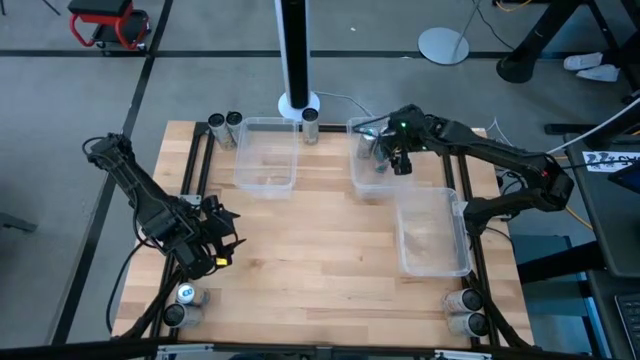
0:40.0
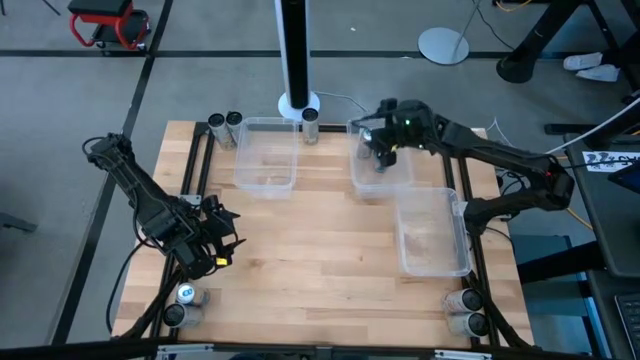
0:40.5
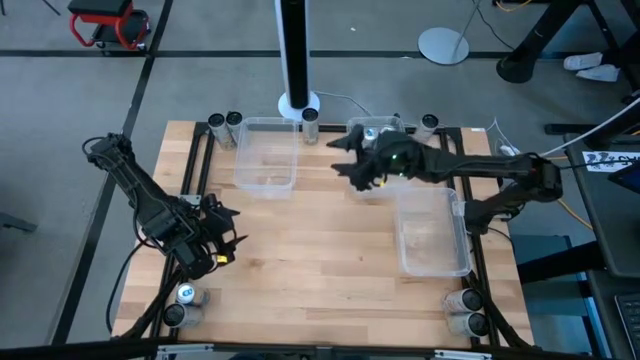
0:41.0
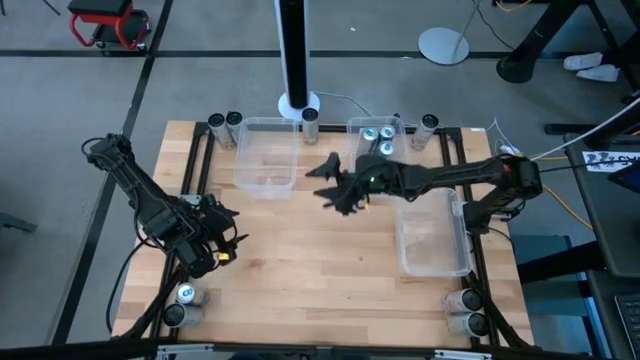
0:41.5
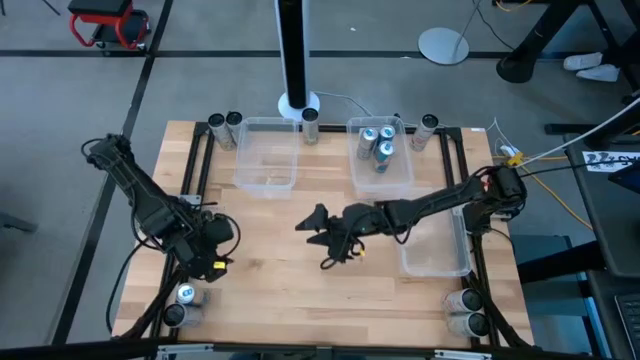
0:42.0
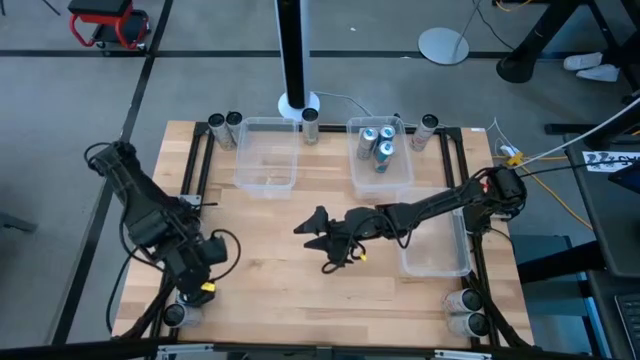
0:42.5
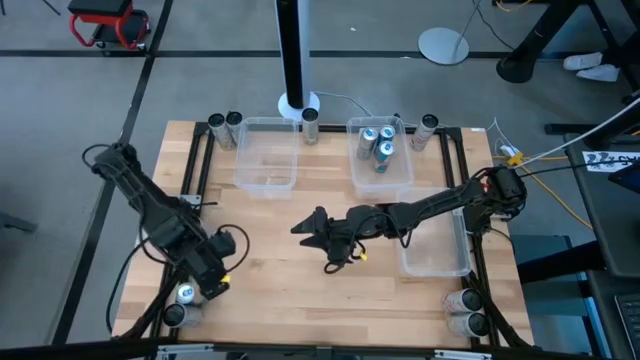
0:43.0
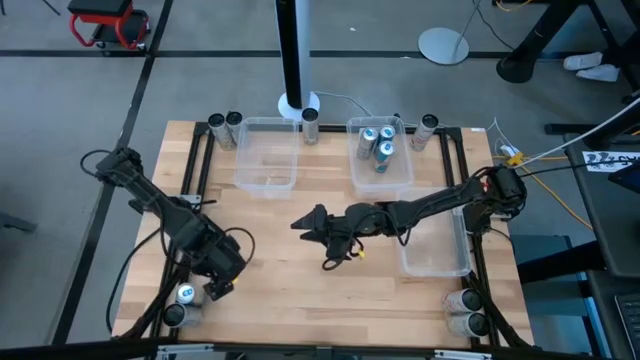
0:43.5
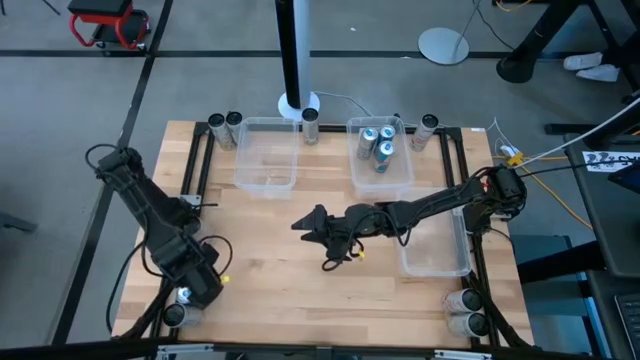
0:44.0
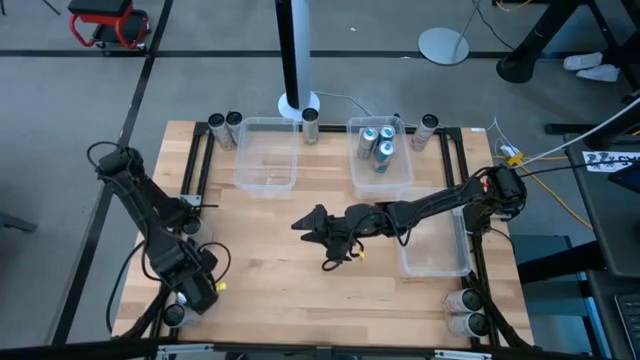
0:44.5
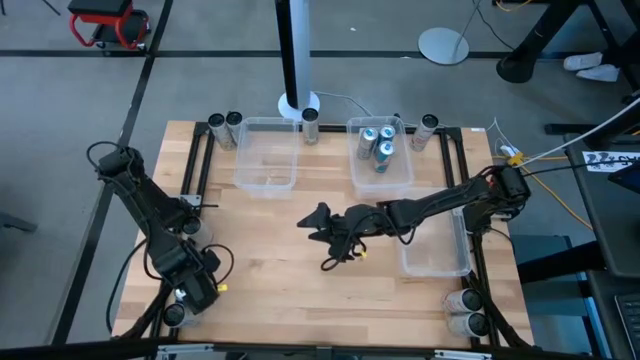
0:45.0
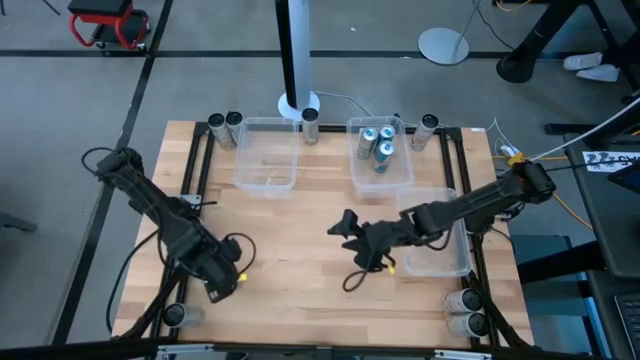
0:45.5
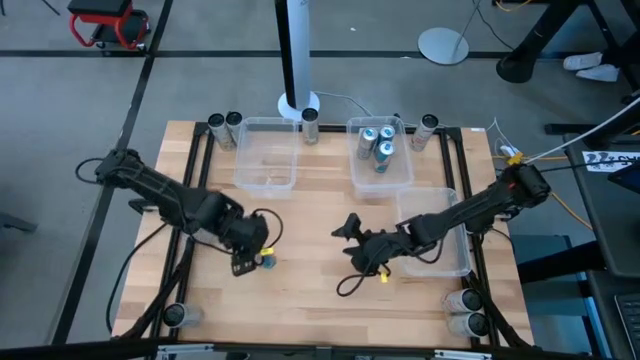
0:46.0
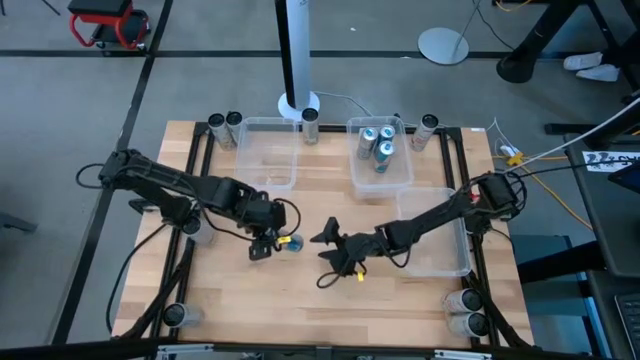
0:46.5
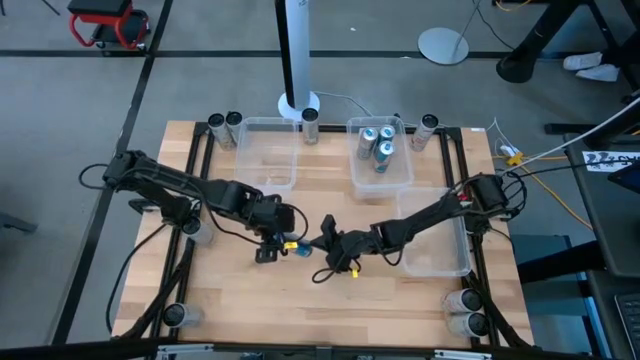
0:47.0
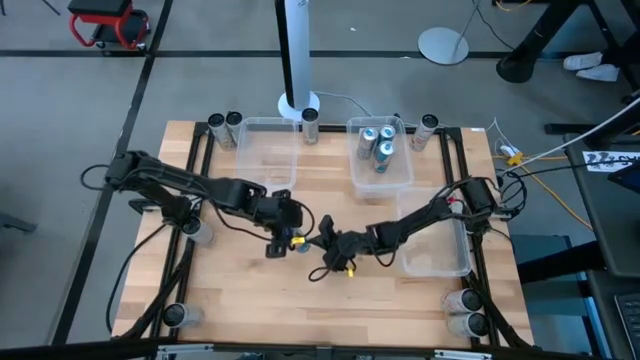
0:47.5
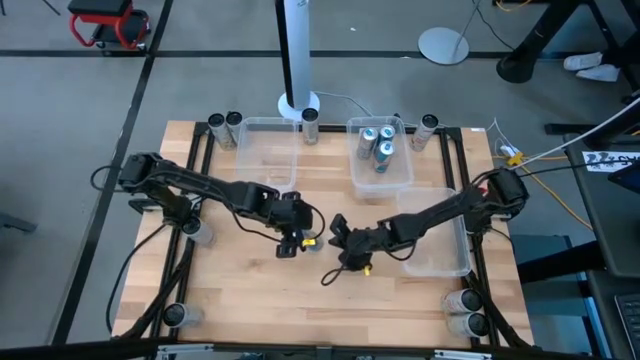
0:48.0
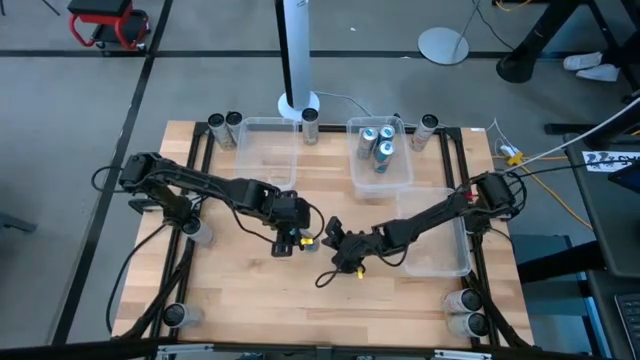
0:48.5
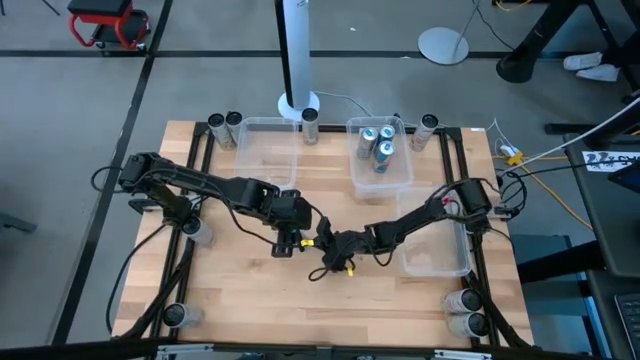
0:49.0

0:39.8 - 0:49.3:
Task: Sort soda cans
Put the blue soda can into the top right transparent bin

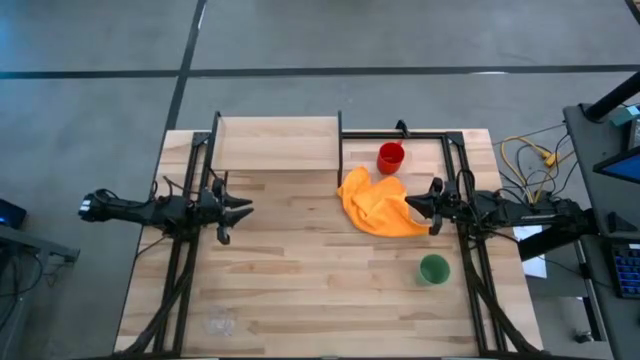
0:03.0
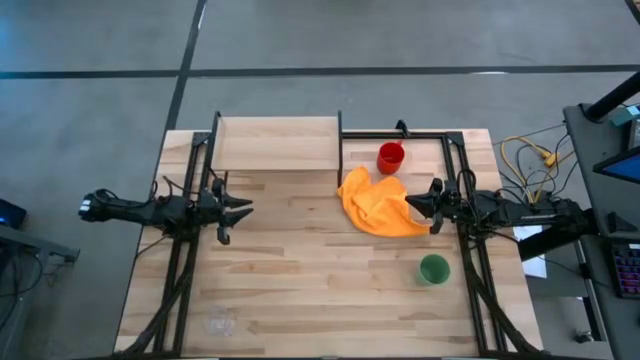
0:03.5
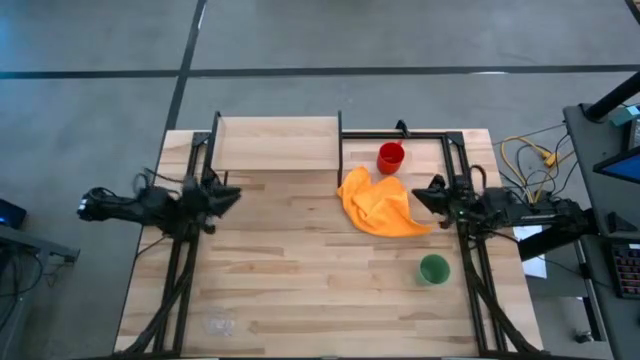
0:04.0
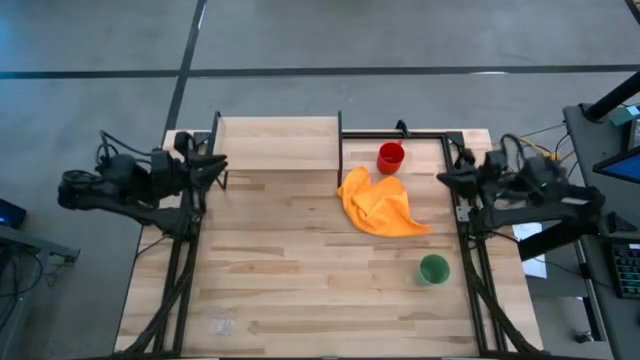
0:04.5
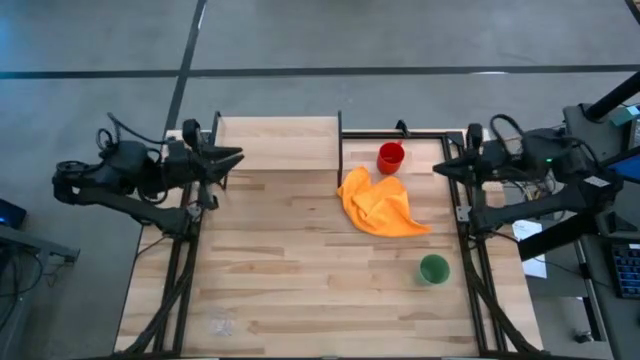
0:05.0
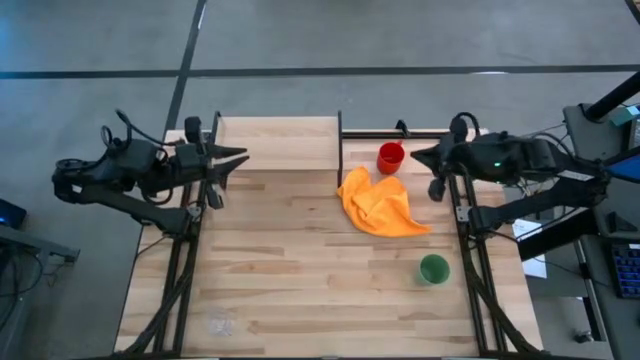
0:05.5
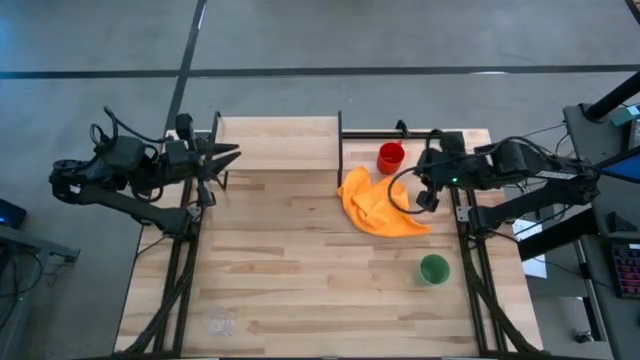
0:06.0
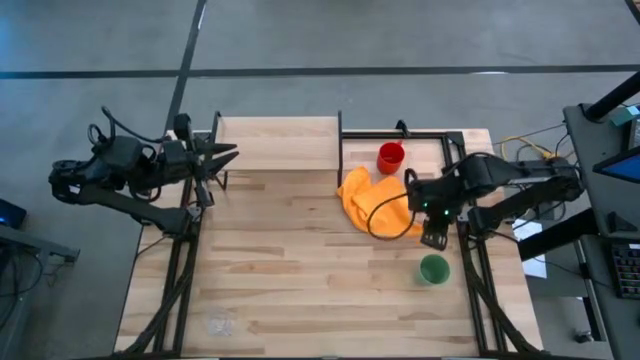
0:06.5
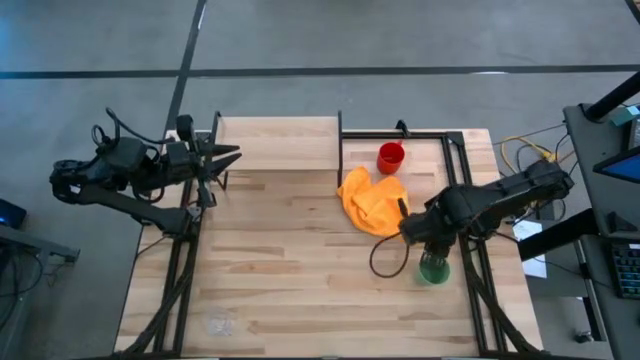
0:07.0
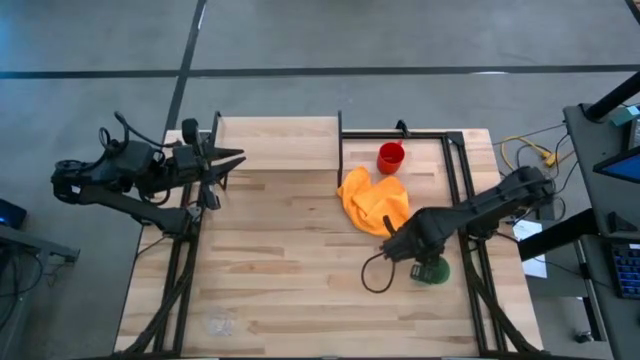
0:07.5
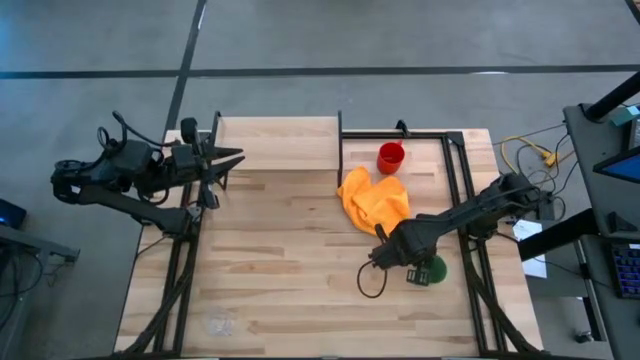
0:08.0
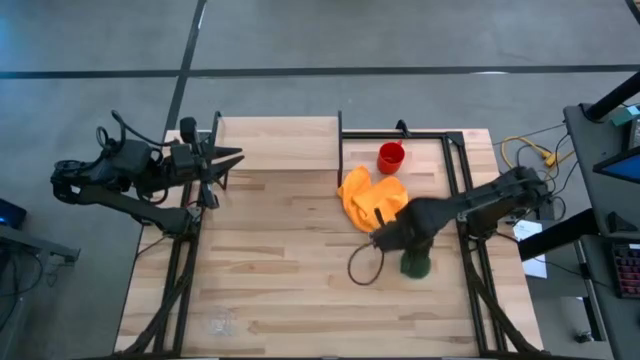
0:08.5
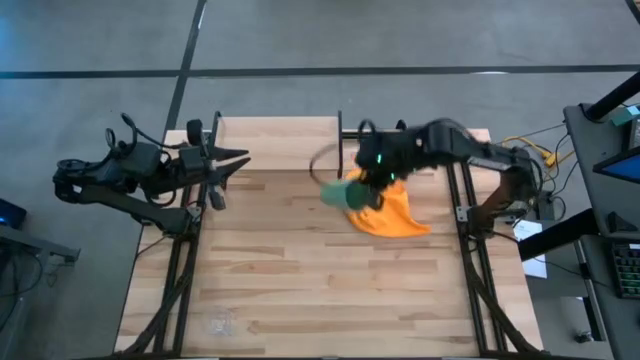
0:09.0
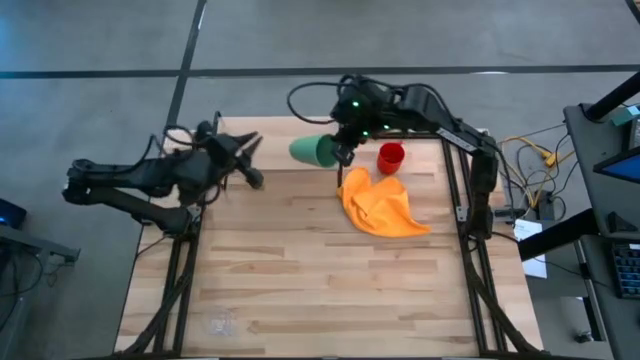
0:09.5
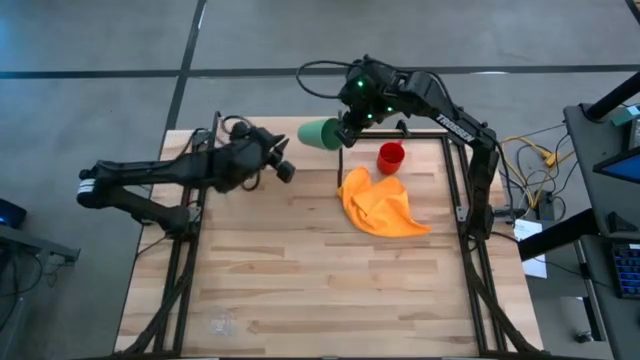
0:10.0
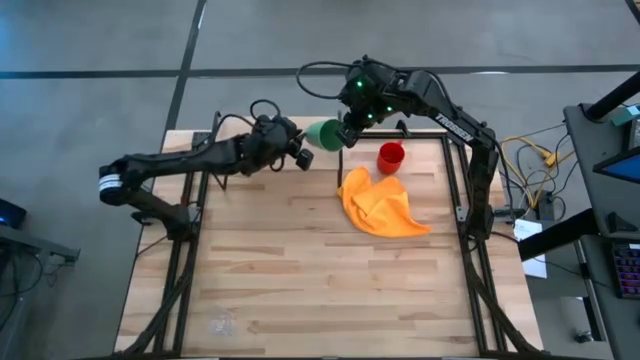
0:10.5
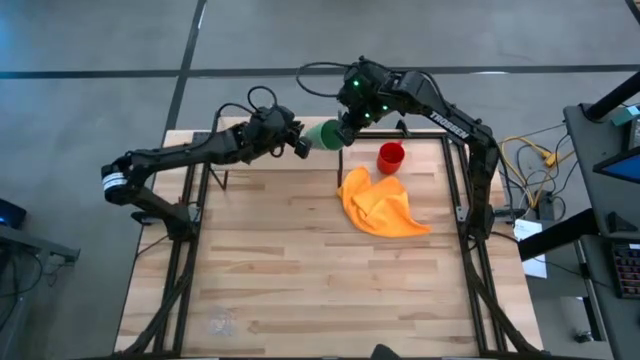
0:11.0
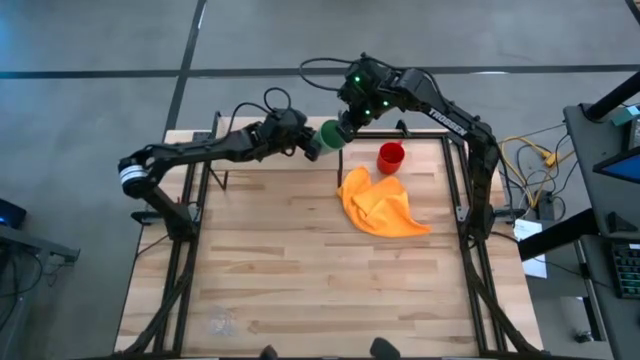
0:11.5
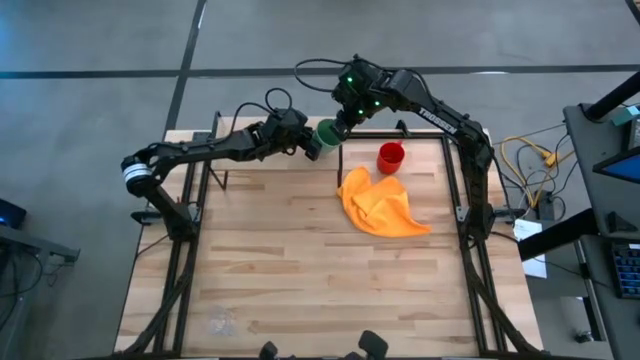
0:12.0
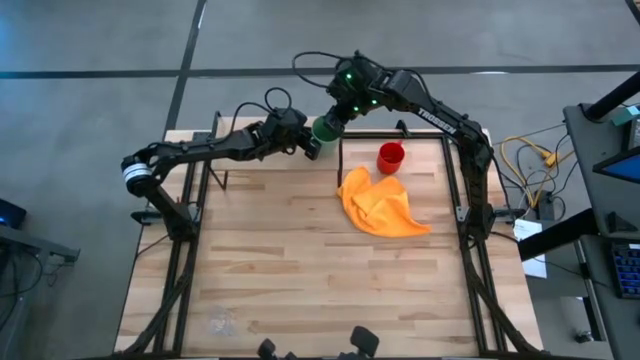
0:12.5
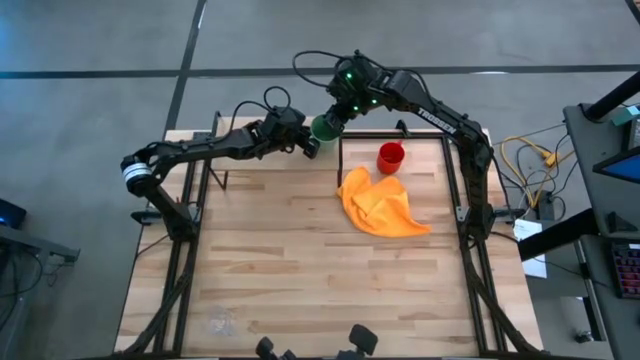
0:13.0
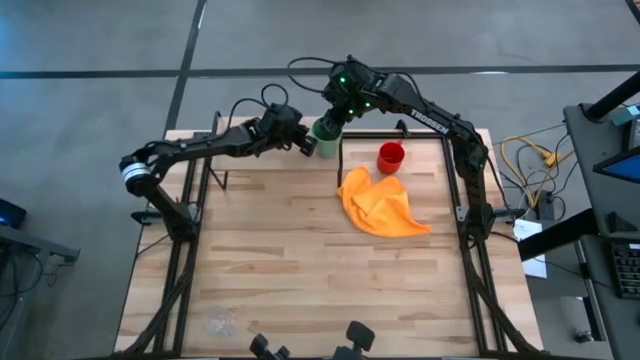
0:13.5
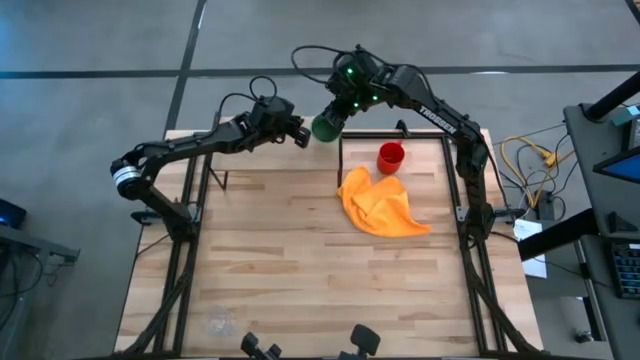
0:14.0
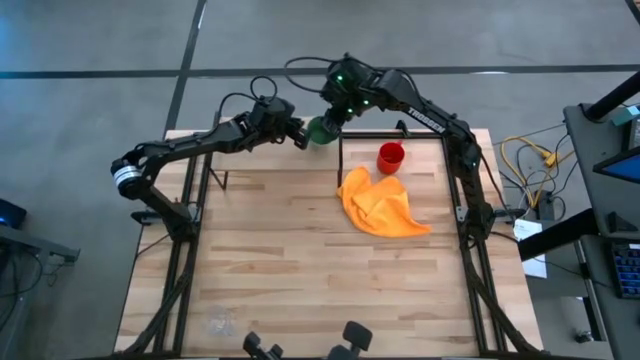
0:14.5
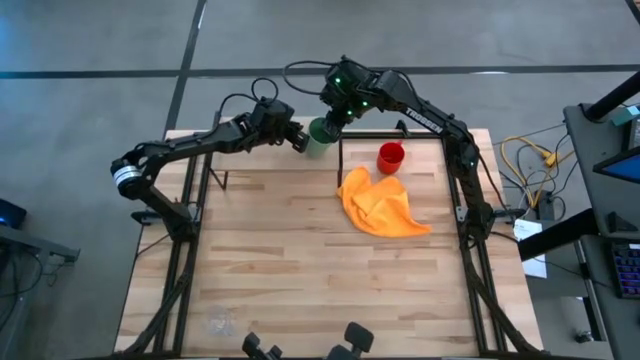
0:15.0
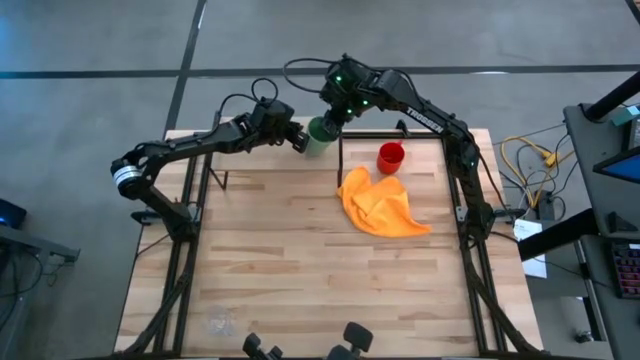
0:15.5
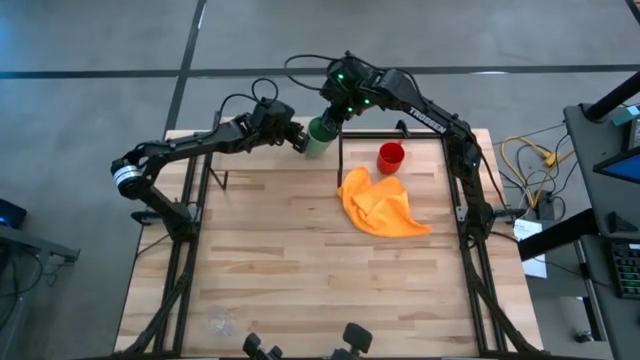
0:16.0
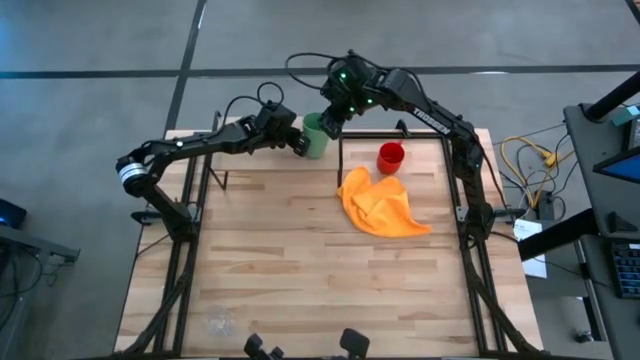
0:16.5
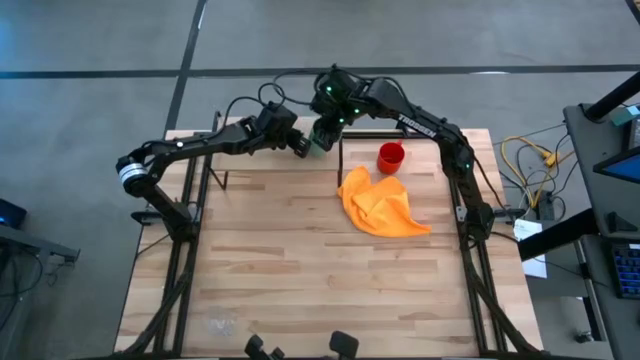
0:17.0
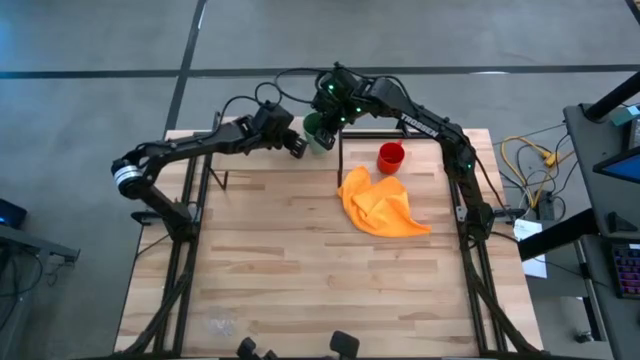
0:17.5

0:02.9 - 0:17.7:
Task: Stack small to large cups/mugs on shelf
Put the green cup on the shelf
